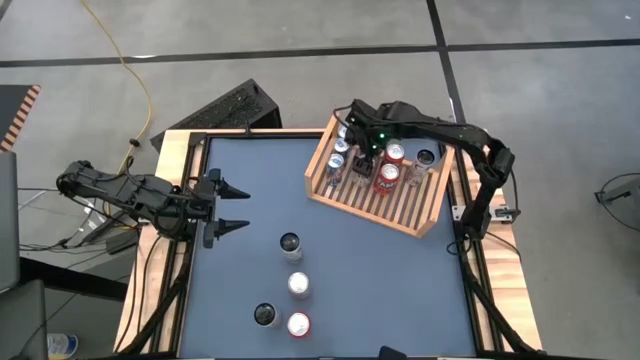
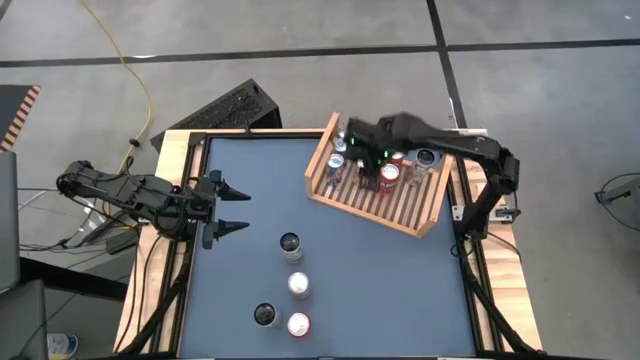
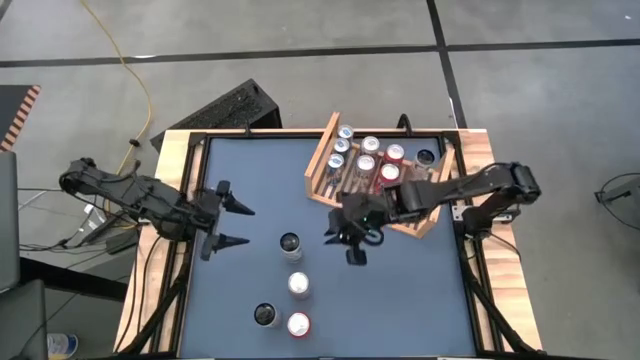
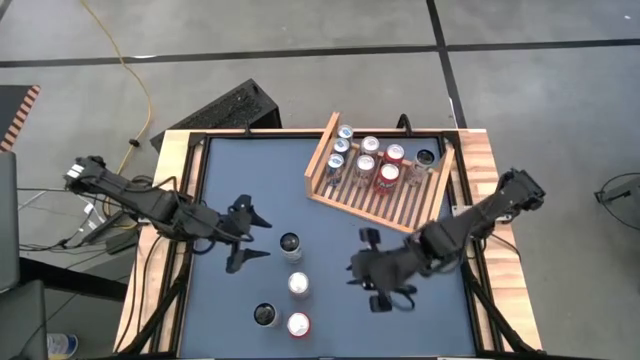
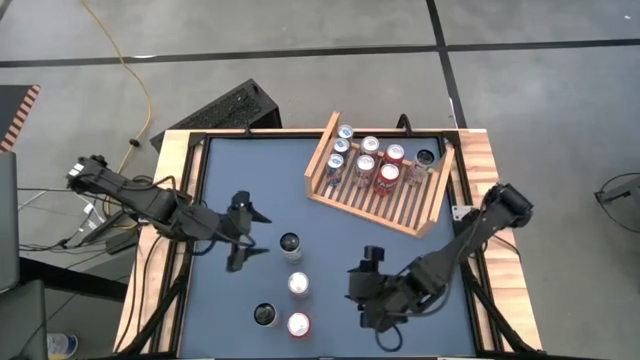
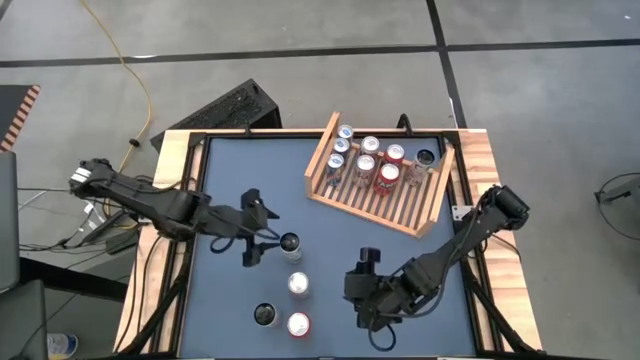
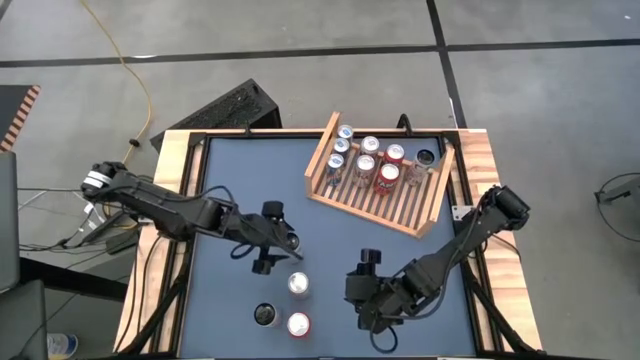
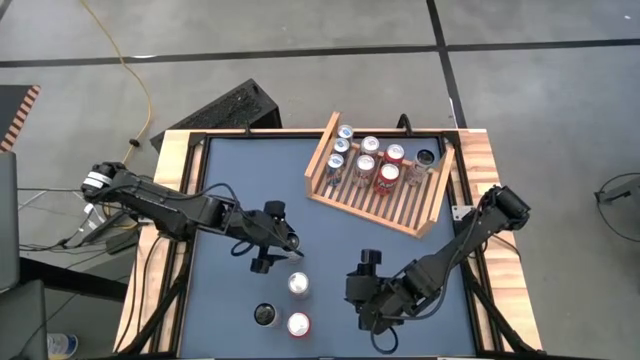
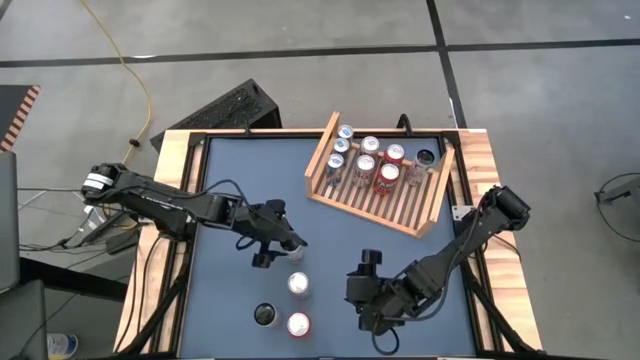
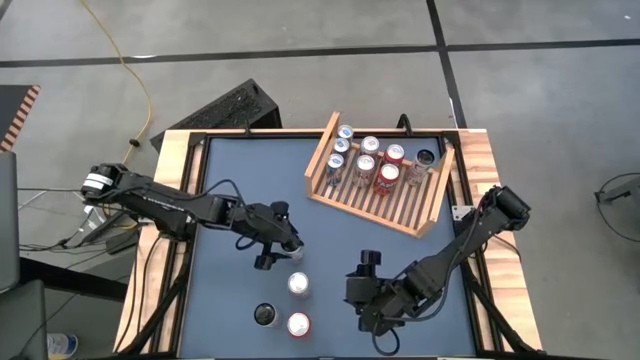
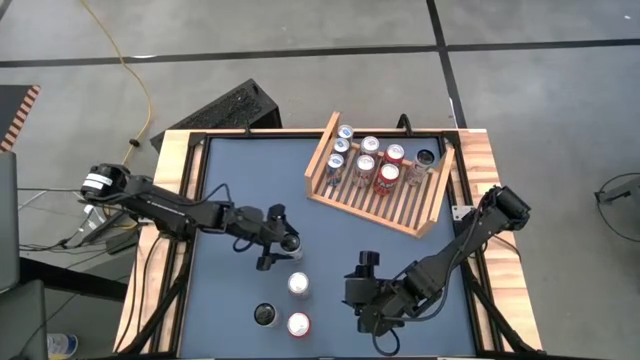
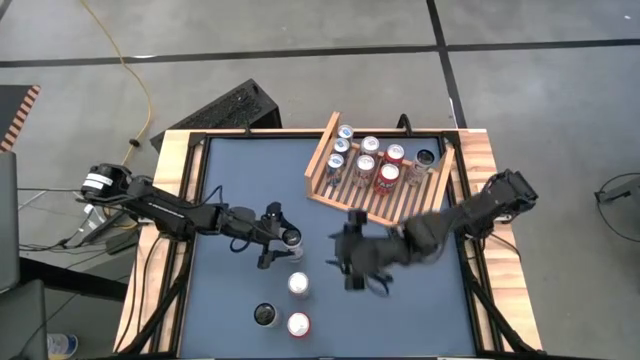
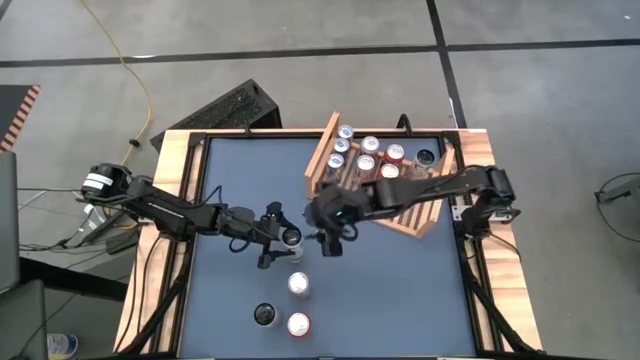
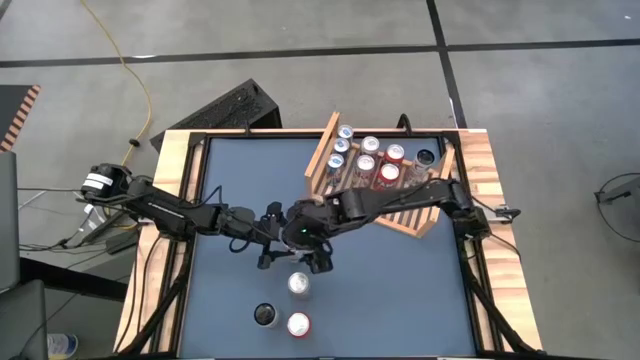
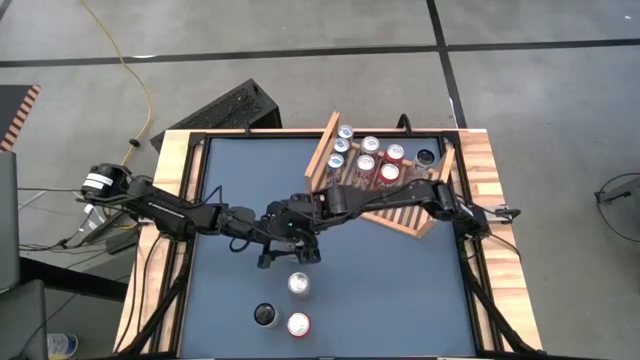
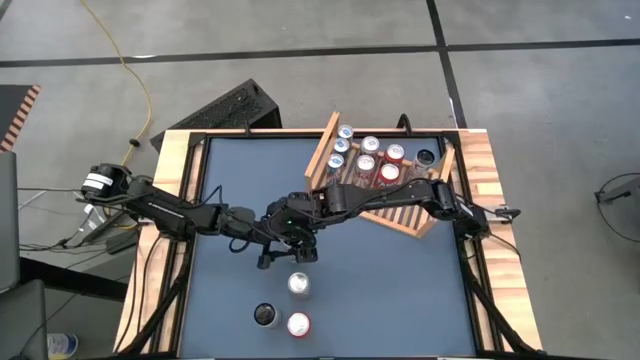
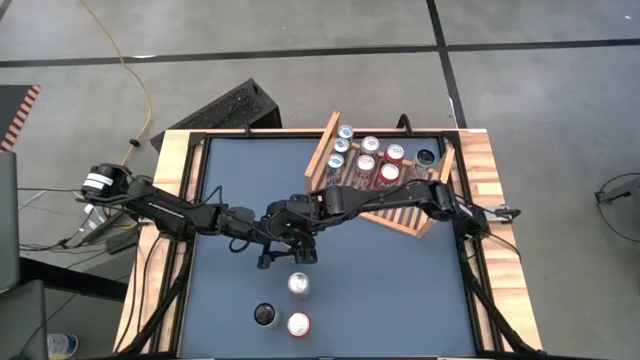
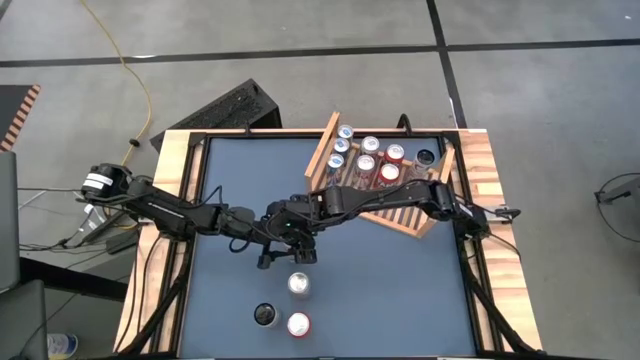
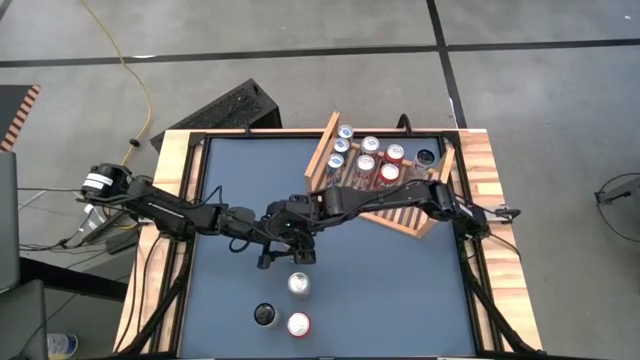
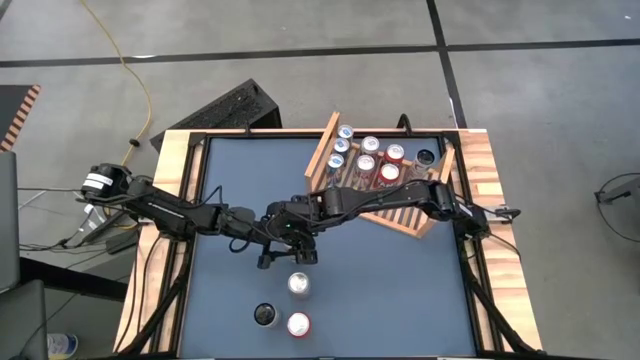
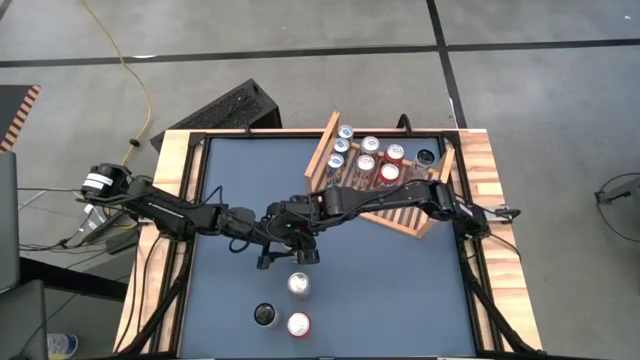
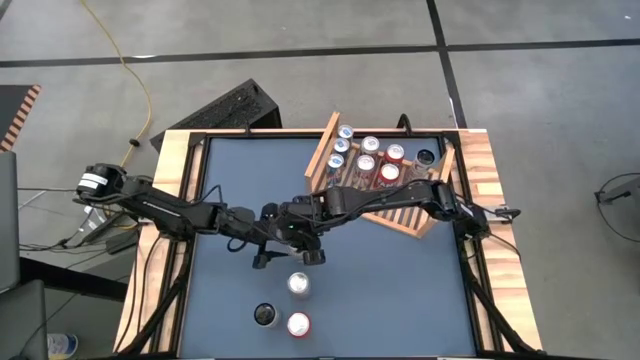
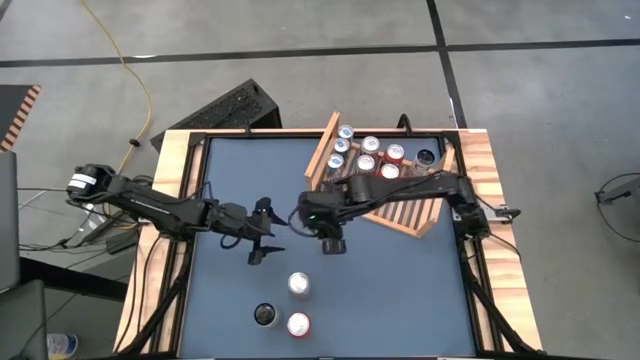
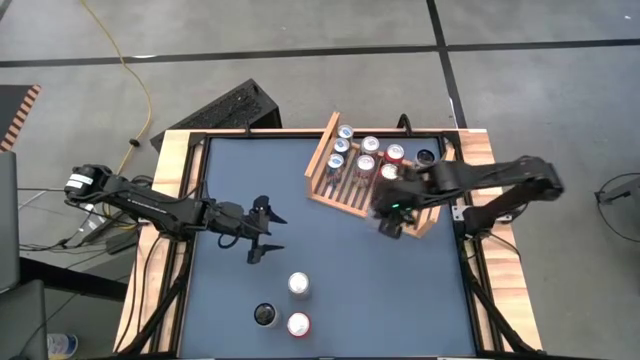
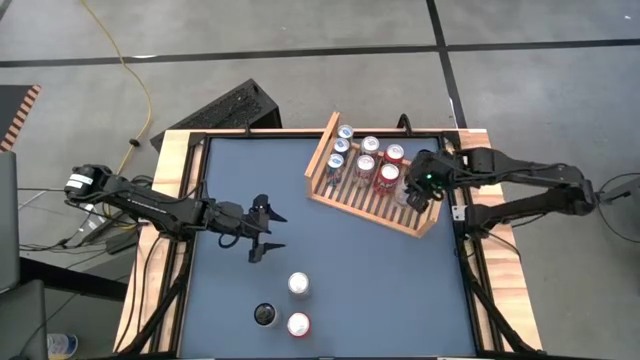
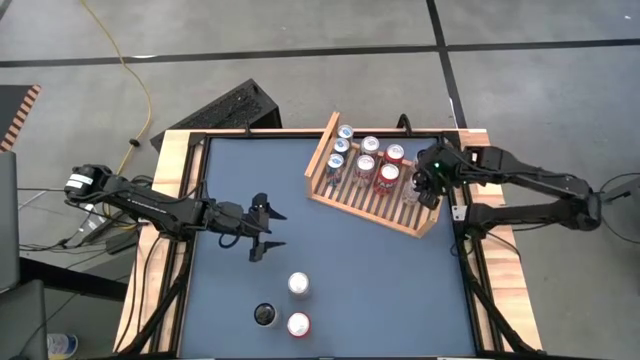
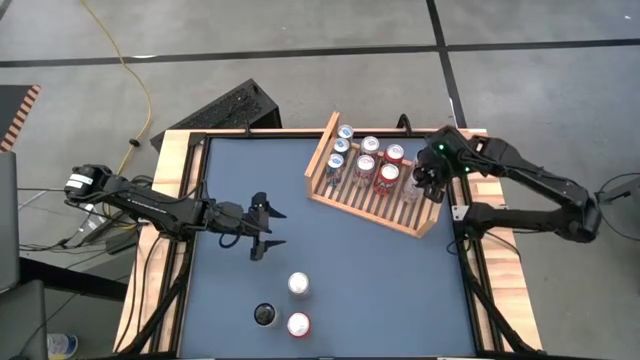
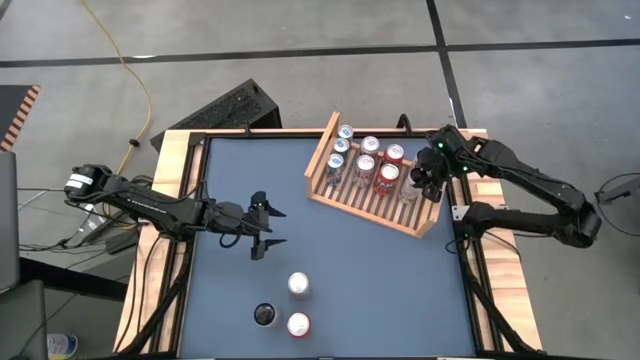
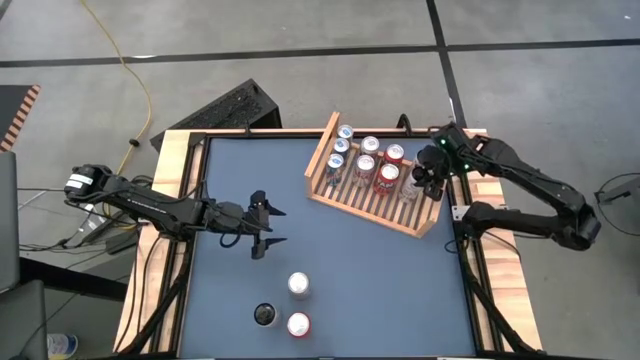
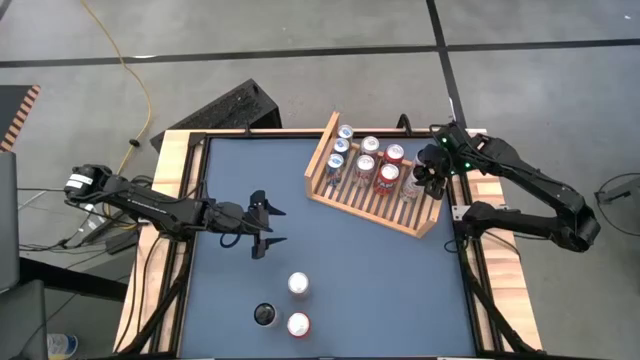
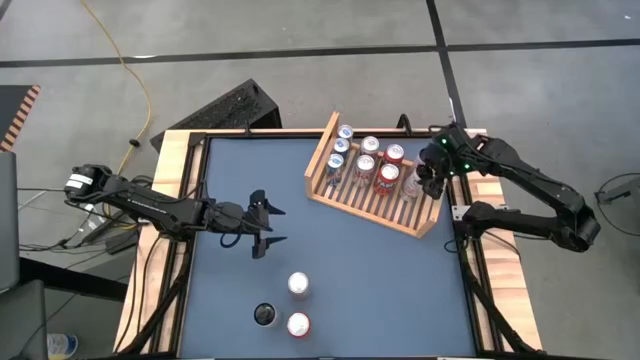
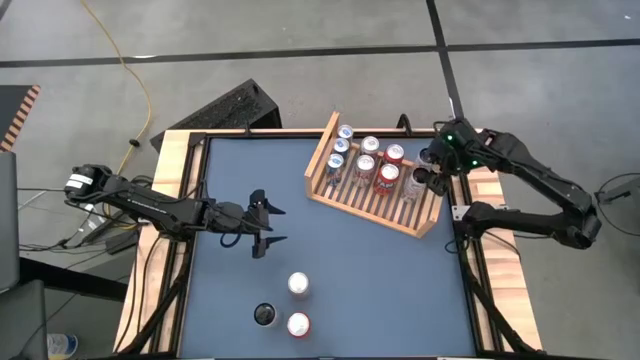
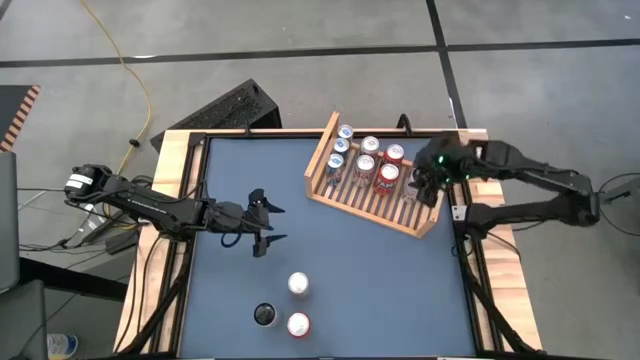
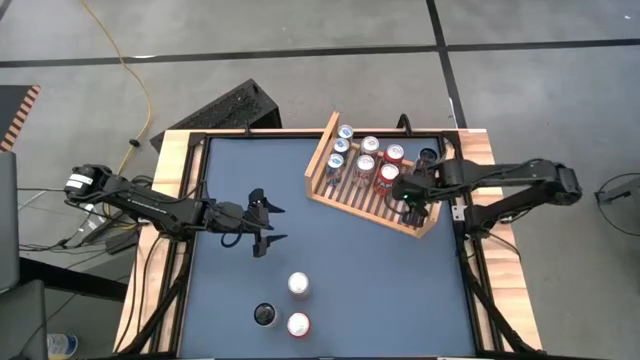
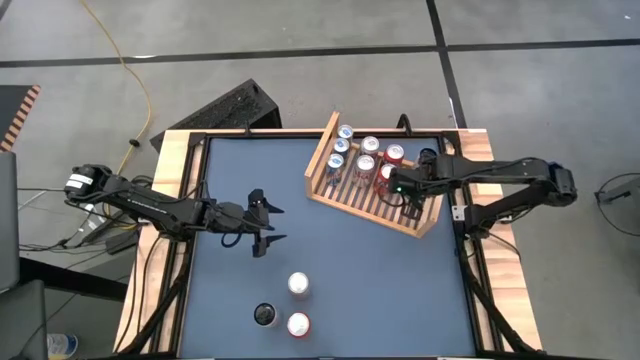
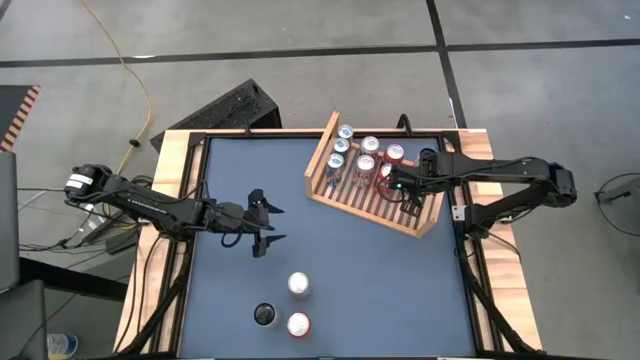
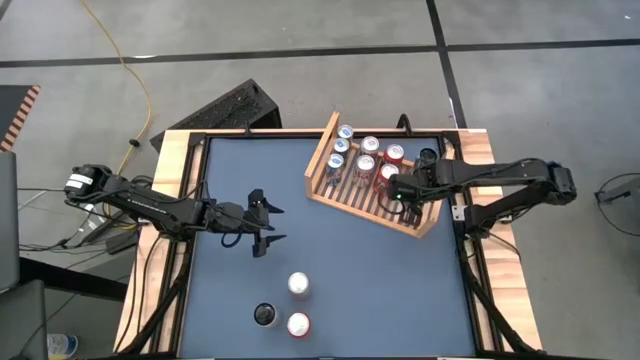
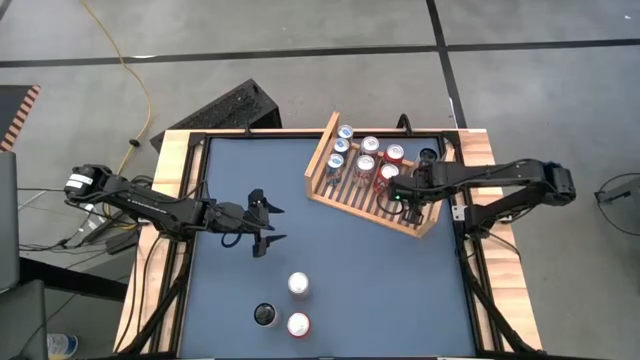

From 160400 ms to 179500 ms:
Task: Place canned beverage on shelf
Put the top white and pink soda can aligned with the other white and pink soda can on the shelf
